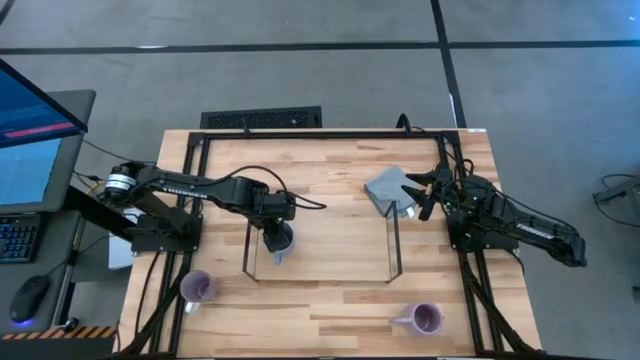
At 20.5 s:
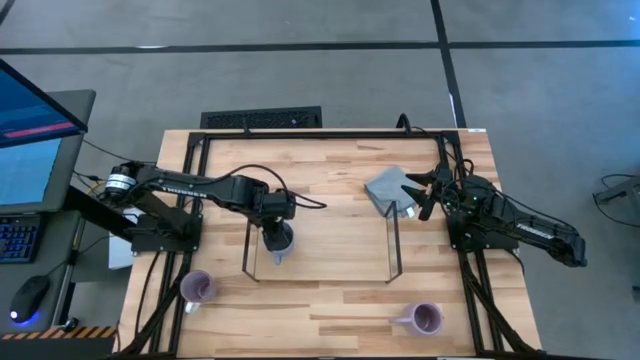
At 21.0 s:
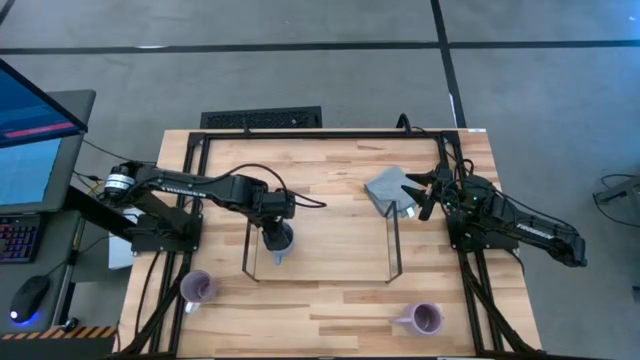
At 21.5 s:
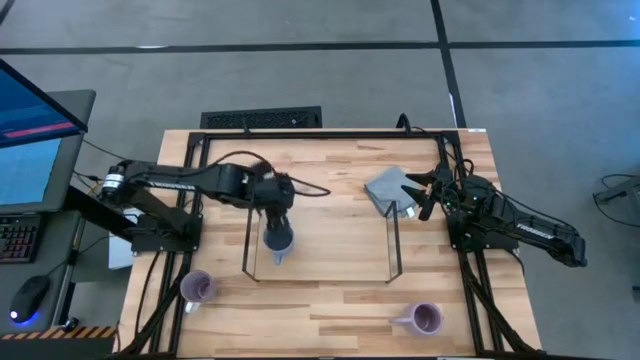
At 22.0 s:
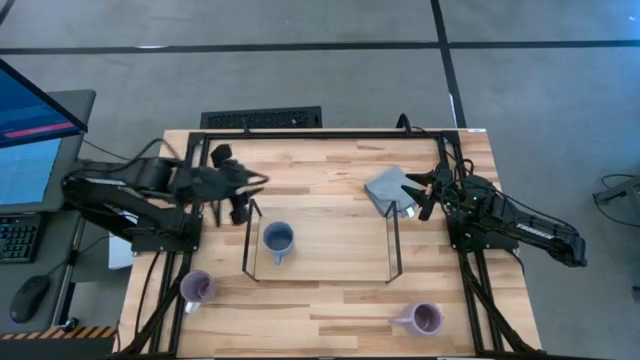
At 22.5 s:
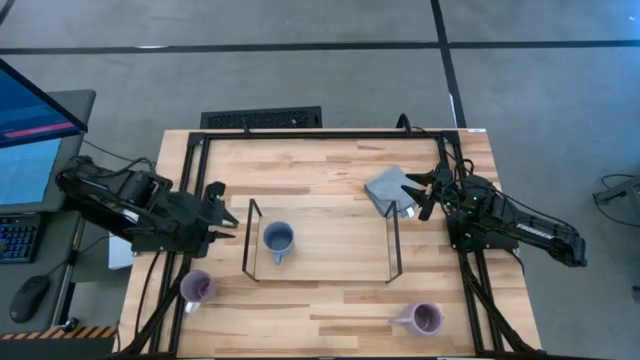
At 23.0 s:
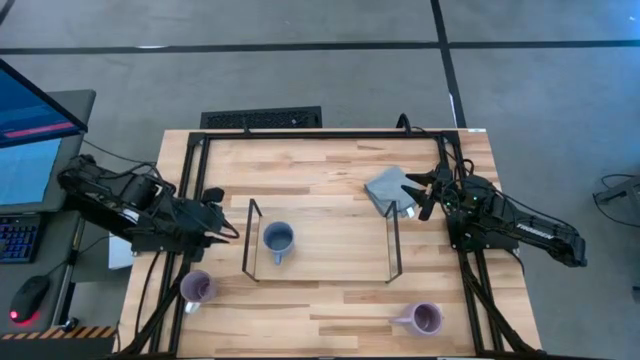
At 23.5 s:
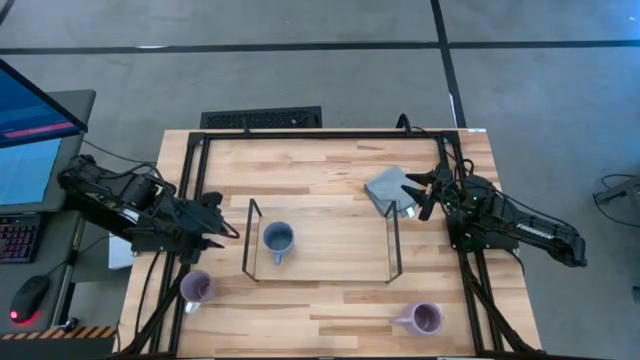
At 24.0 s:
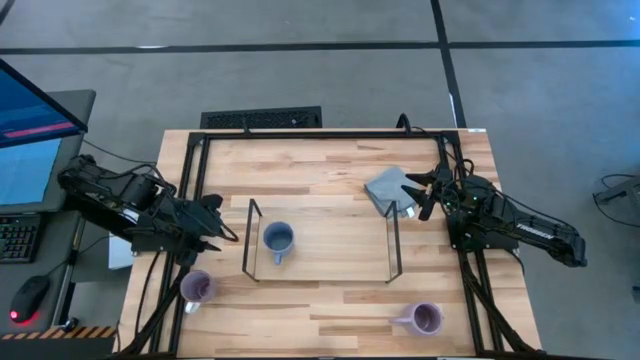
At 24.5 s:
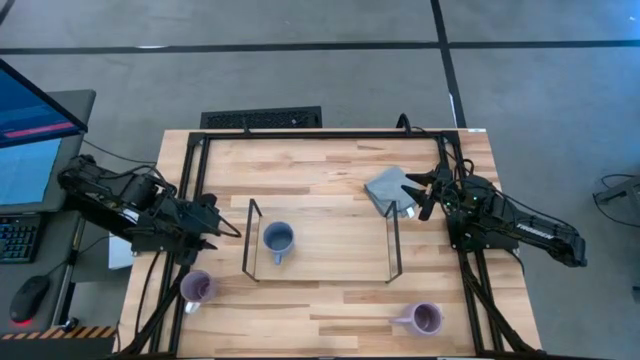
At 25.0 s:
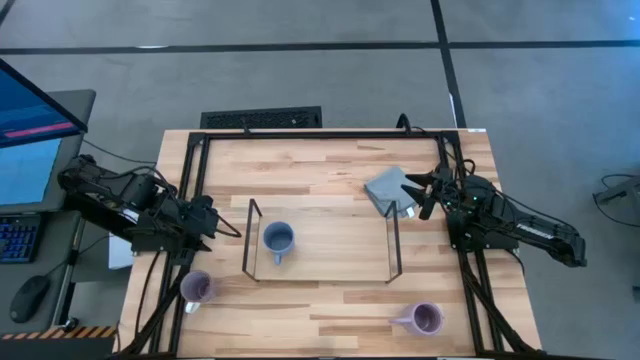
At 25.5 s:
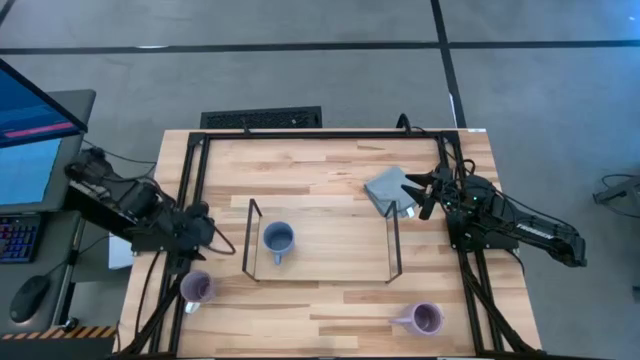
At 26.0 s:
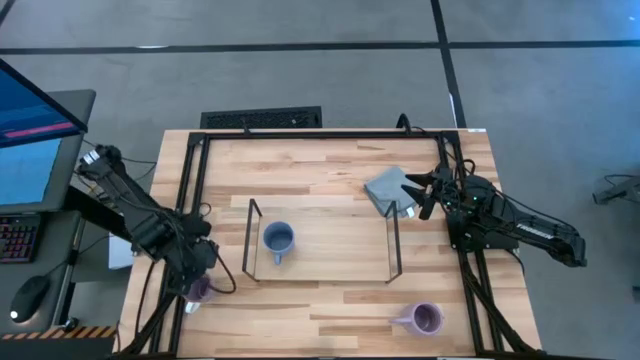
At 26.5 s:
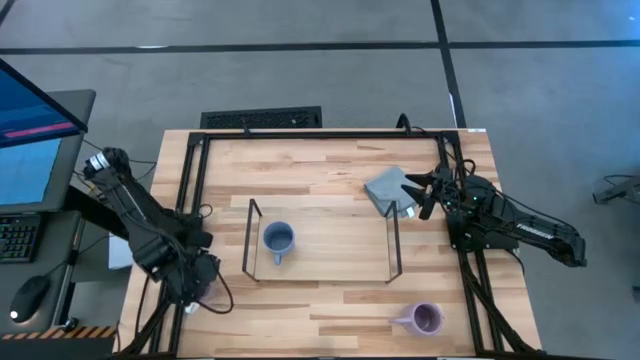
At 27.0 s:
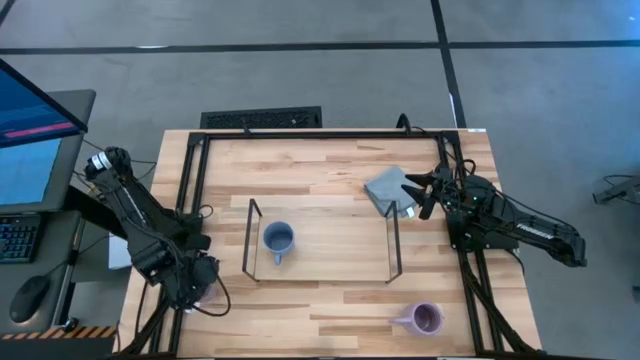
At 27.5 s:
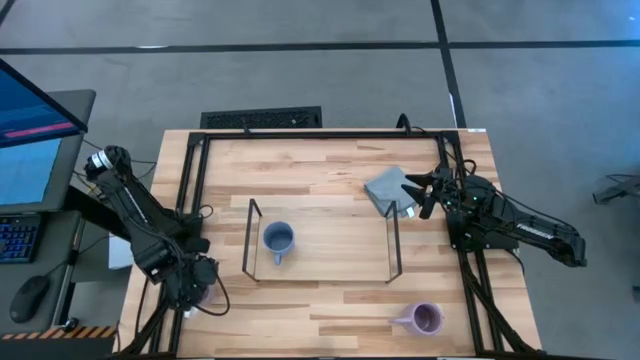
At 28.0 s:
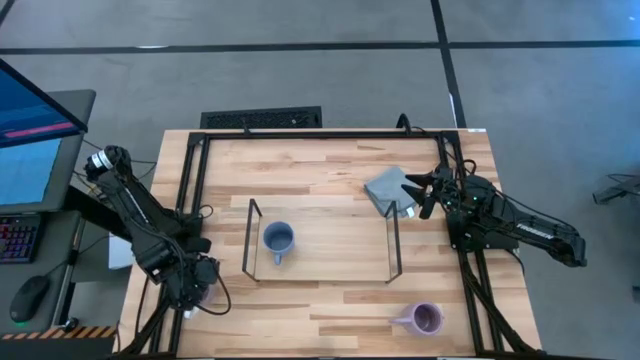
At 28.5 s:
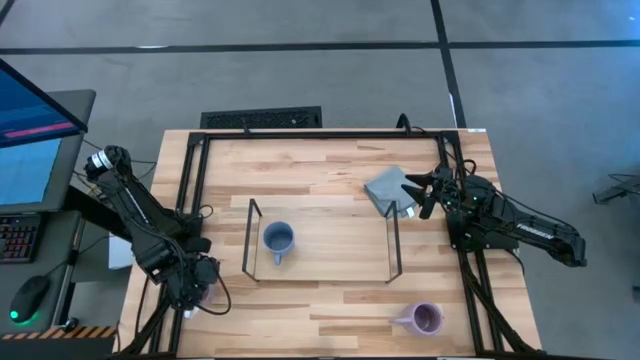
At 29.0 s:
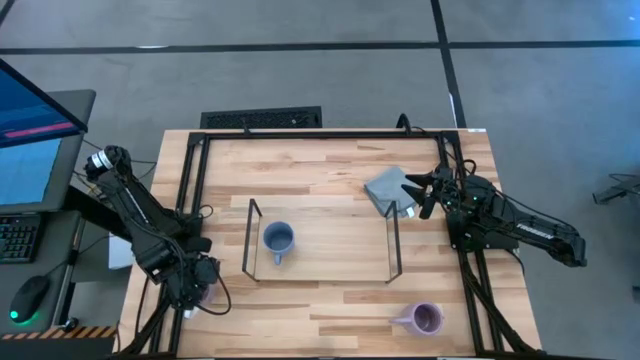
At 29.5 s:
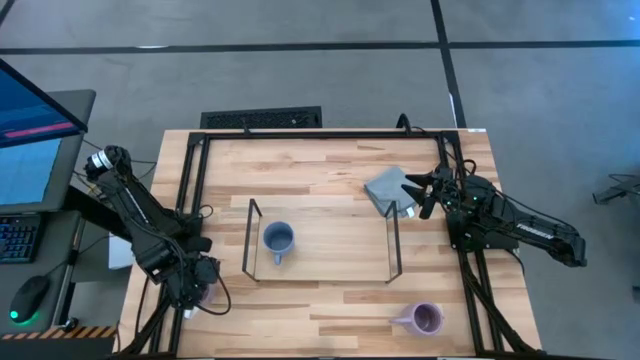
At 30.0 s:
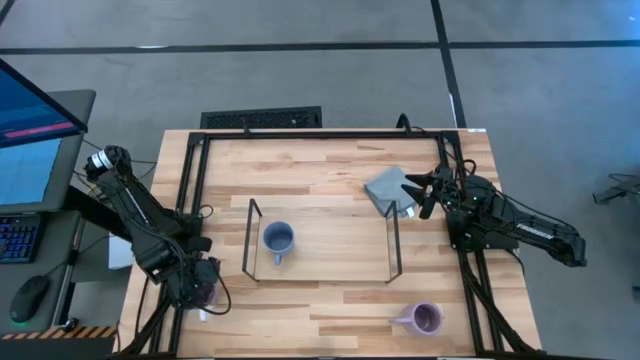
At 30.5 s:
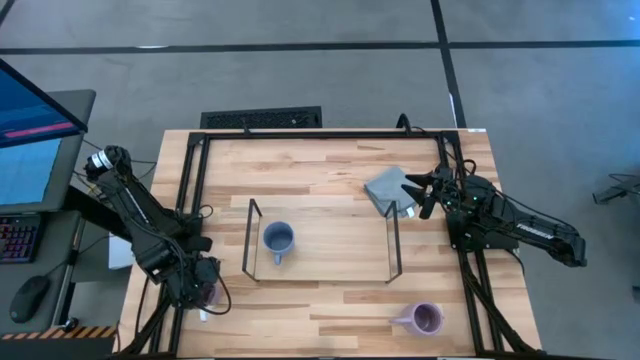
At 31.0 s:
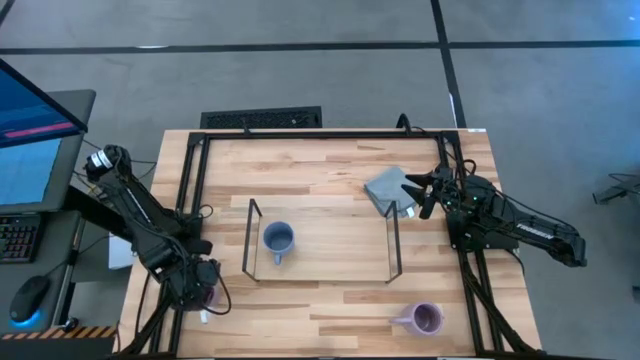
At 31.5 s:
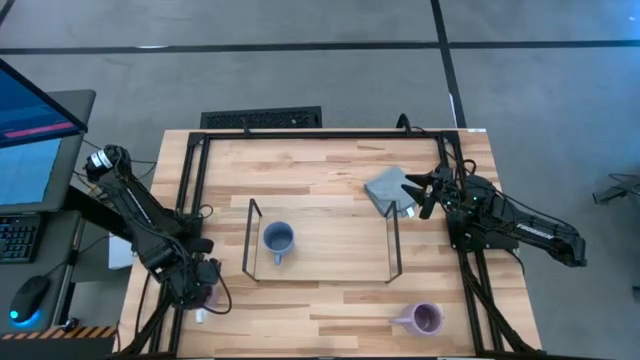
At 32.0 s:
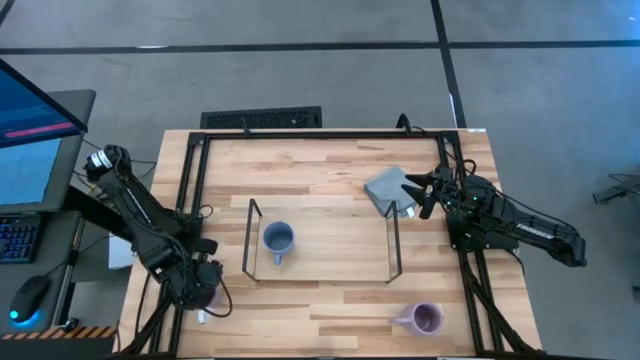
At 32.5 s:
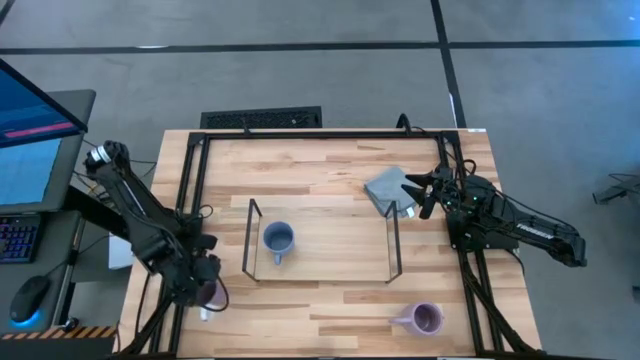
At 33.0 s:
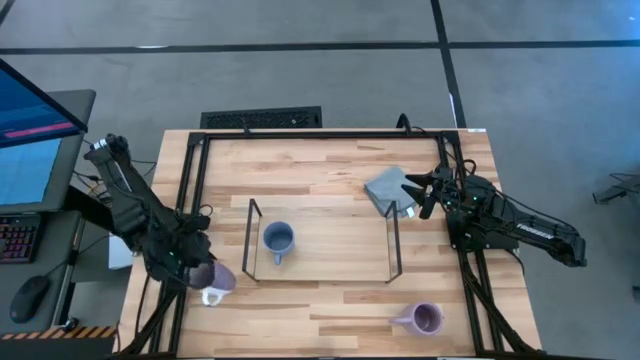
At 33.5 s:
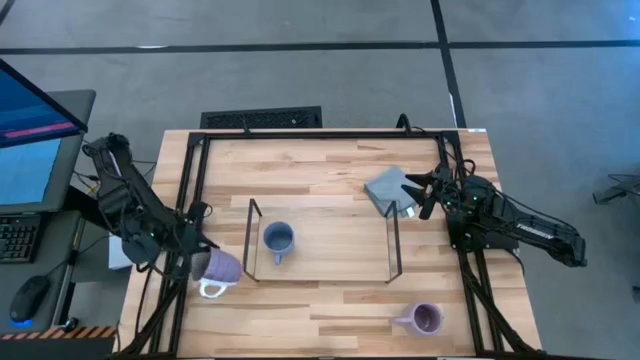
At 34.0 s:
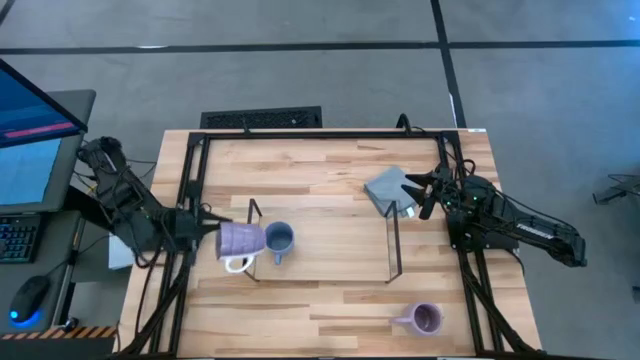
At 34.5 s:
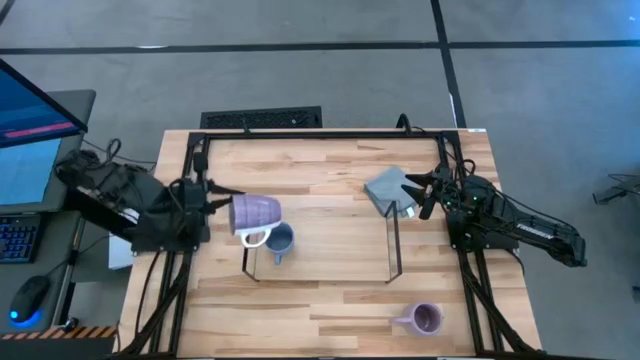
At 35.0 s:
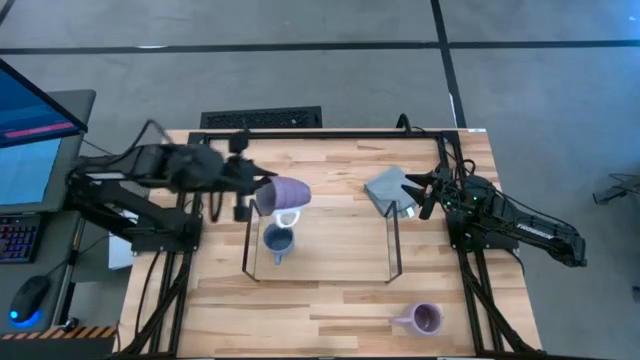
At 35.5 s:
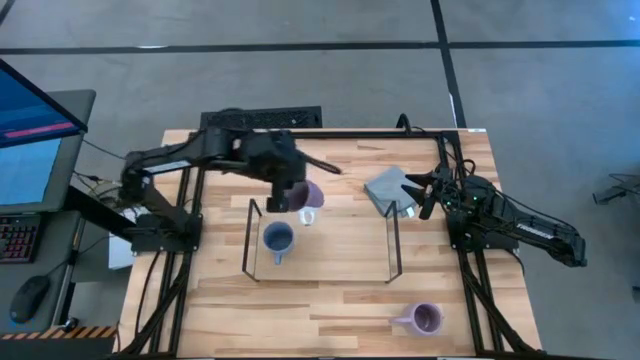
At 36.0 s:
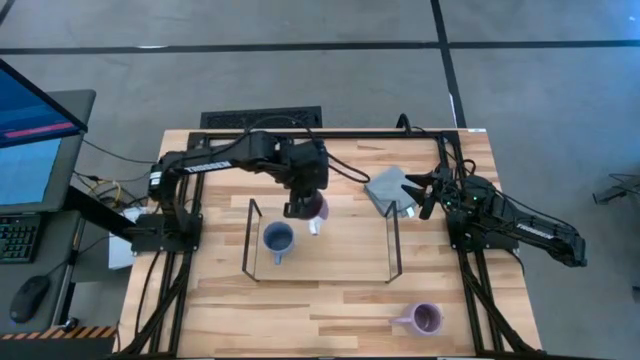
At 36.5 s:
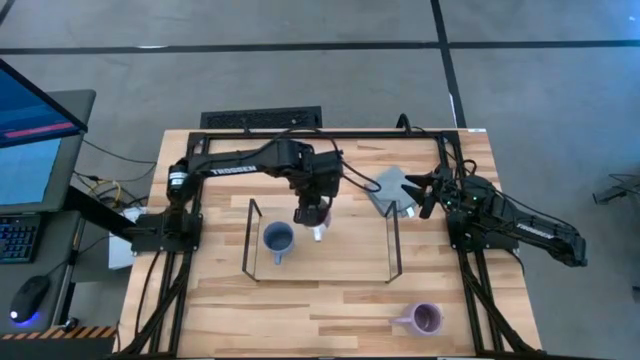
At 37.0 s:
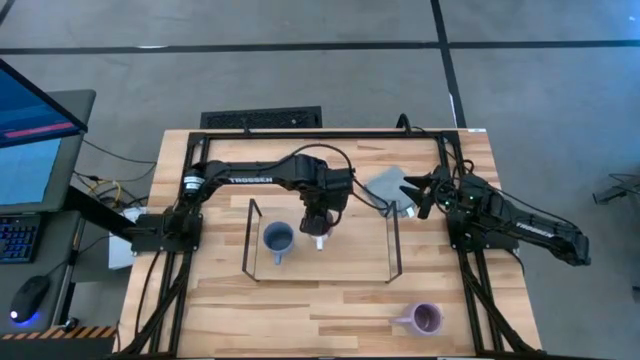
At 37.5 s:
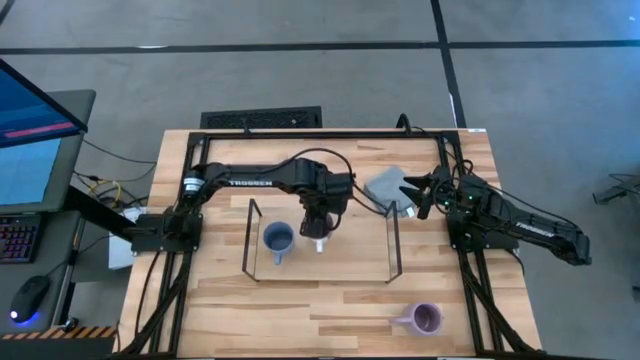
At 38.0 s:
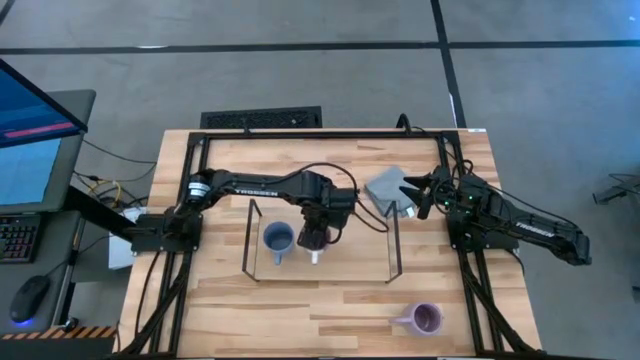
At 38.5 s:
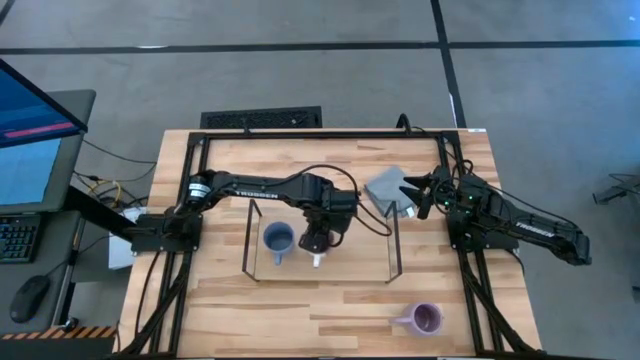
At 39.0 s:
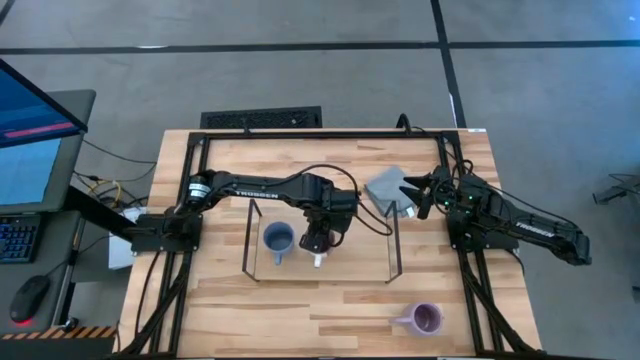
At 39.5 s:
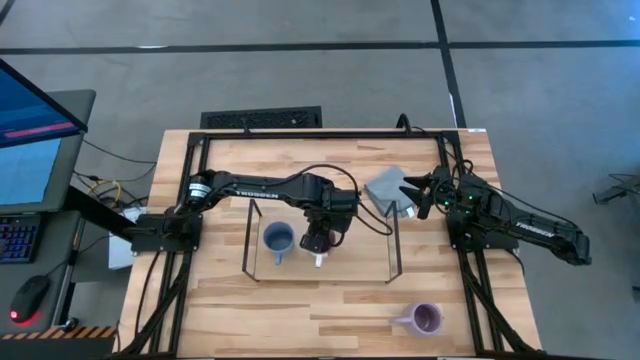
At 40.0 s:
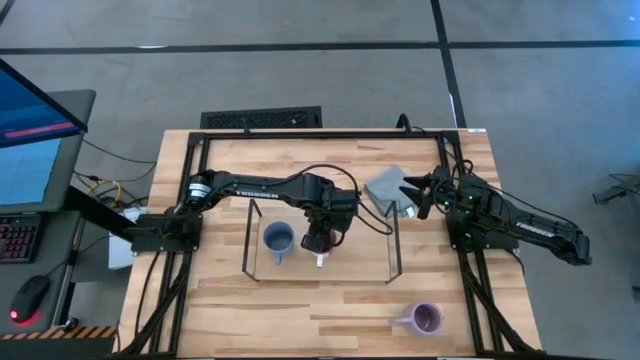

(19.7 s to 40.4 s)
Task: Stack small to large cups/mugs on shelf
Put the left purple mug on the shelf

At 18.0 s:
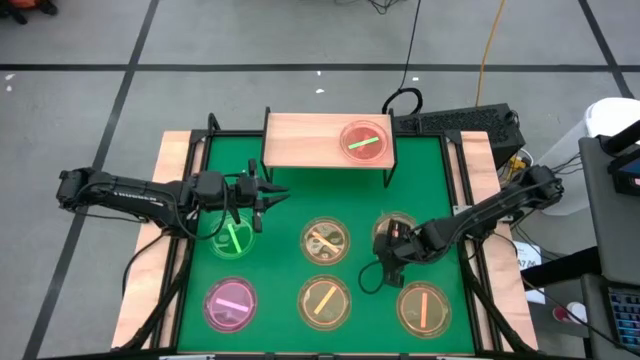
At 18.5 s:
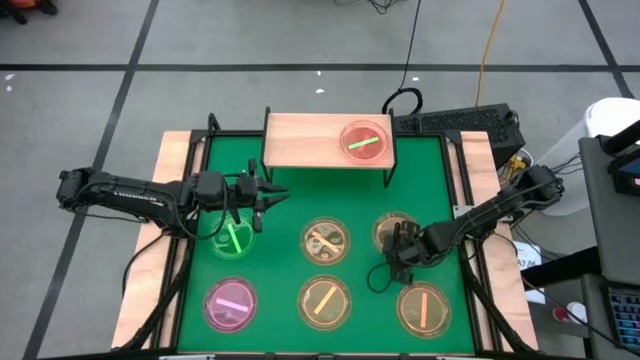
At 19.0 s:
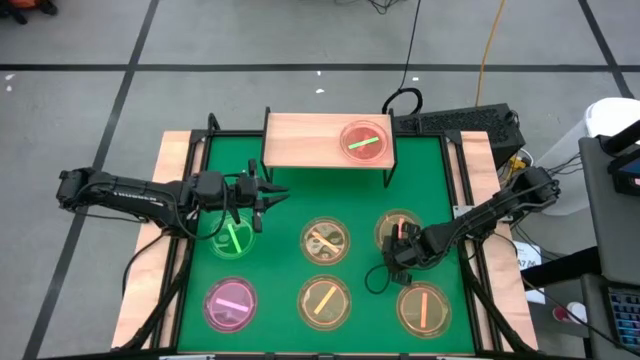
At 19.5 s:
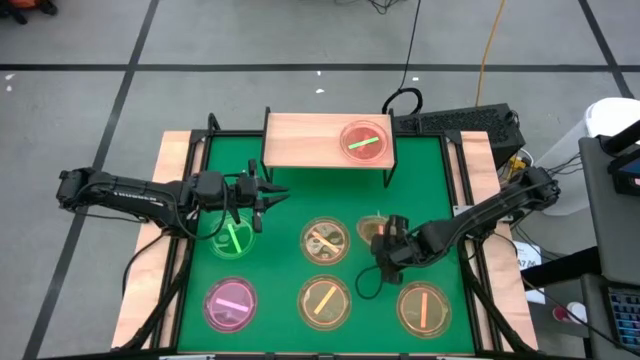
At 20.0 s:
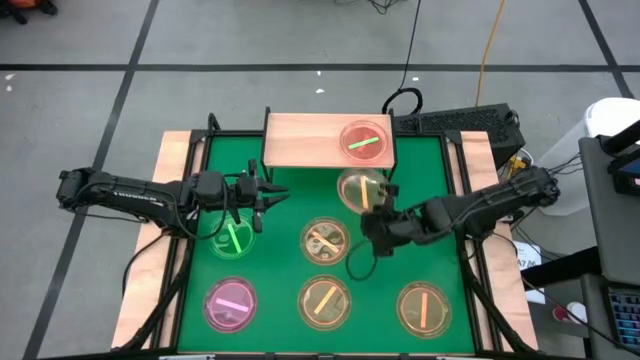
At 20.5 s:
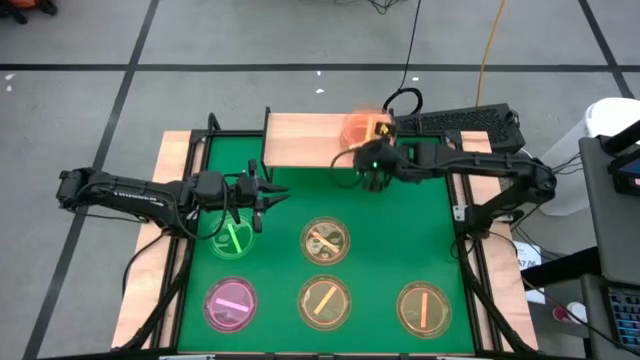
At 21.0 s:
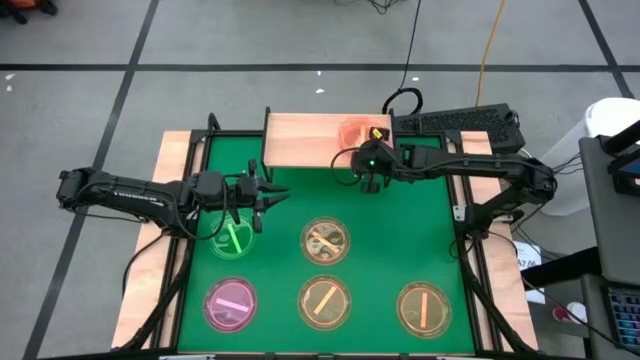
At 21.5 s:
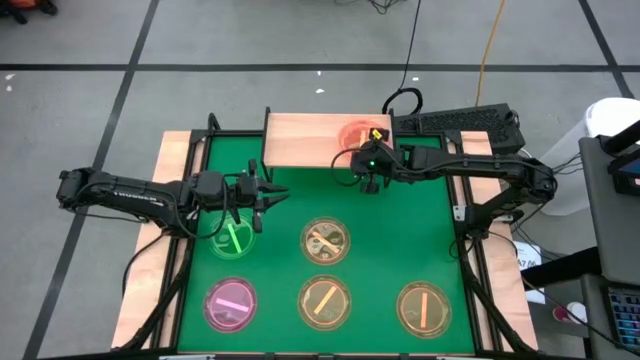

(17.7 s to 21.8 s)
Task: Place and stack plates onto a shelf
Stack the top right orange plate on top of the green plate on the shelf
